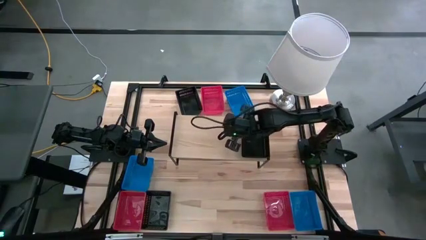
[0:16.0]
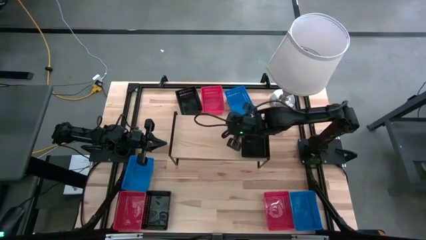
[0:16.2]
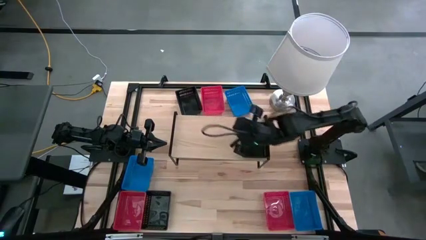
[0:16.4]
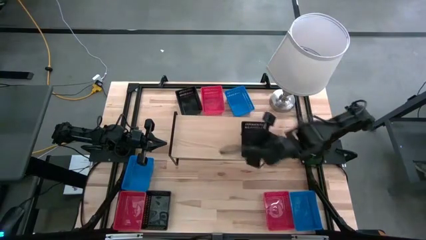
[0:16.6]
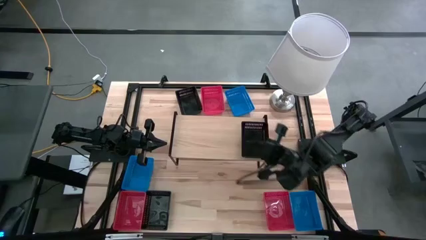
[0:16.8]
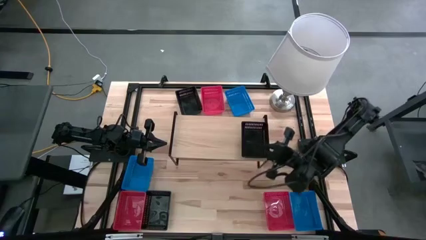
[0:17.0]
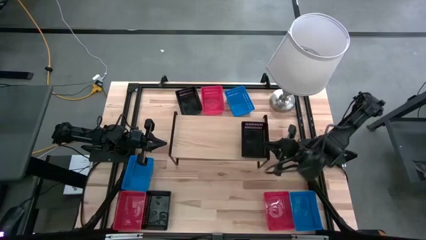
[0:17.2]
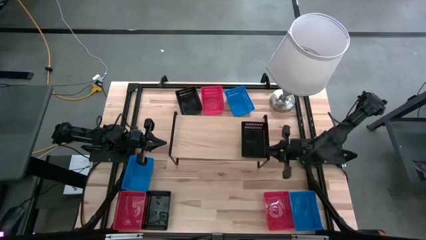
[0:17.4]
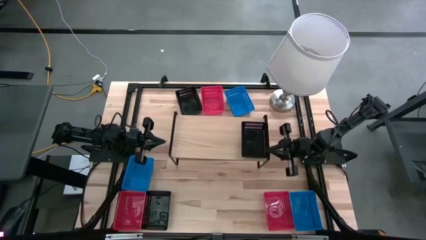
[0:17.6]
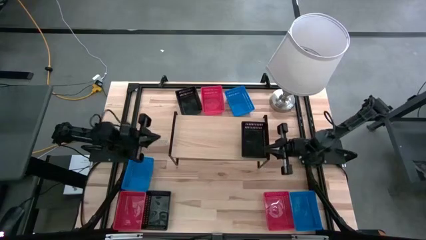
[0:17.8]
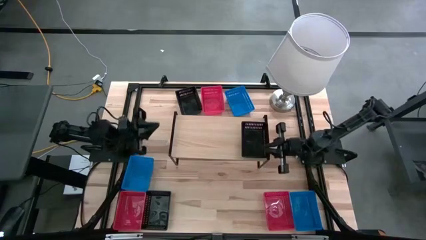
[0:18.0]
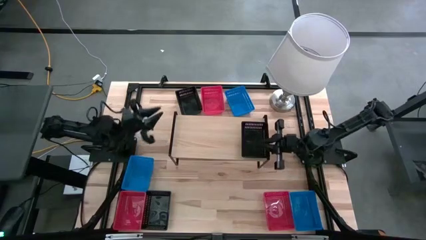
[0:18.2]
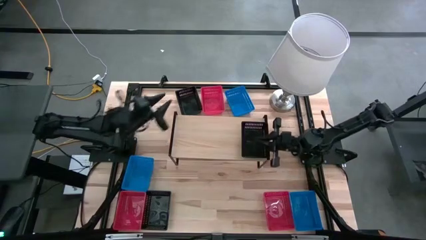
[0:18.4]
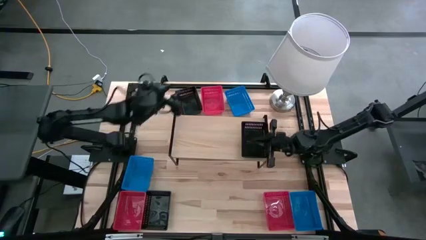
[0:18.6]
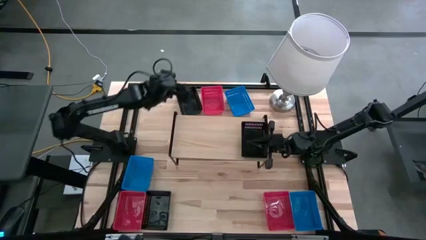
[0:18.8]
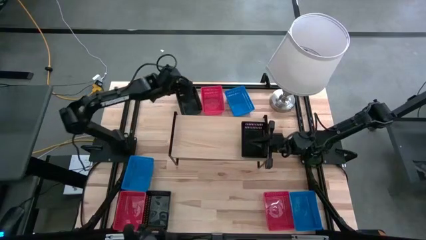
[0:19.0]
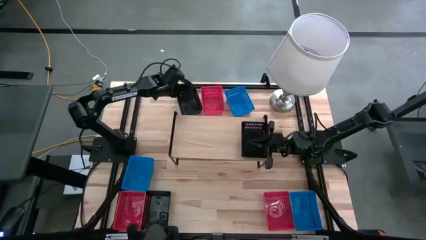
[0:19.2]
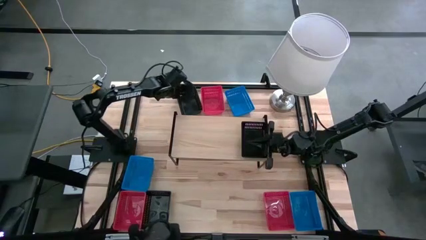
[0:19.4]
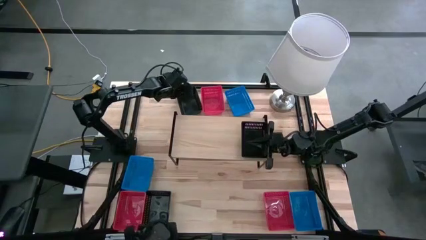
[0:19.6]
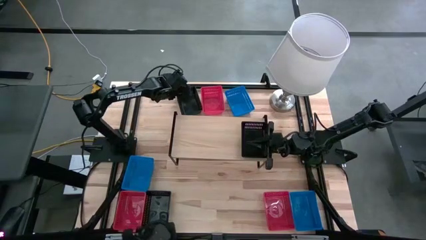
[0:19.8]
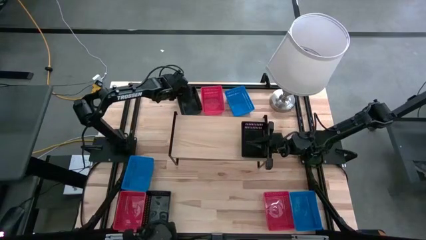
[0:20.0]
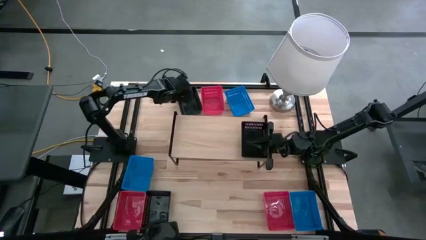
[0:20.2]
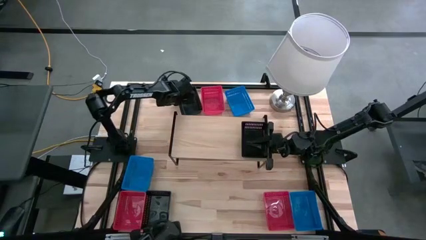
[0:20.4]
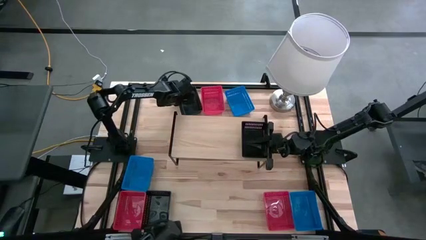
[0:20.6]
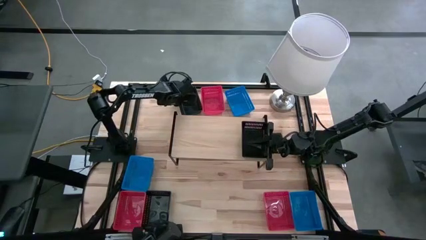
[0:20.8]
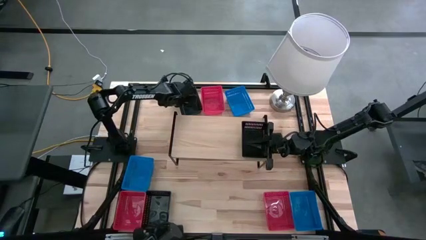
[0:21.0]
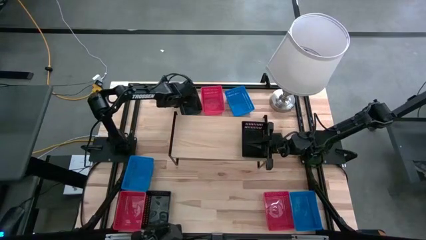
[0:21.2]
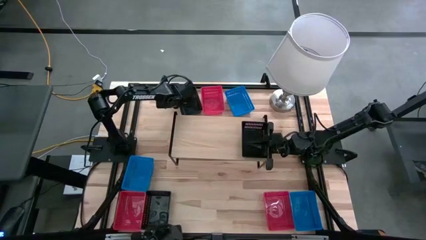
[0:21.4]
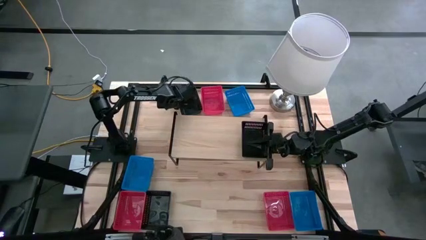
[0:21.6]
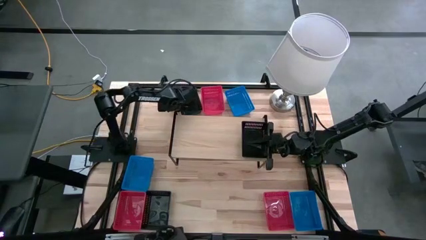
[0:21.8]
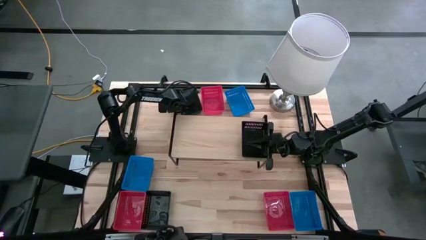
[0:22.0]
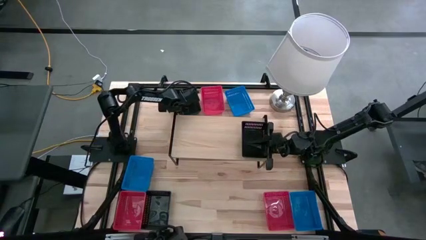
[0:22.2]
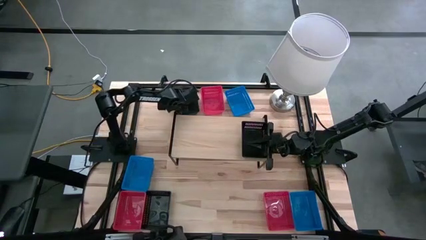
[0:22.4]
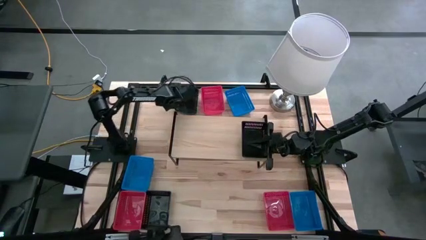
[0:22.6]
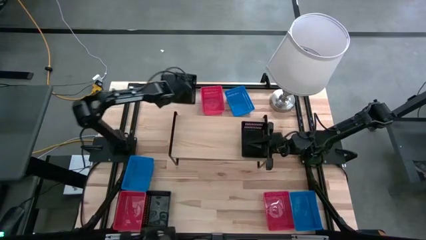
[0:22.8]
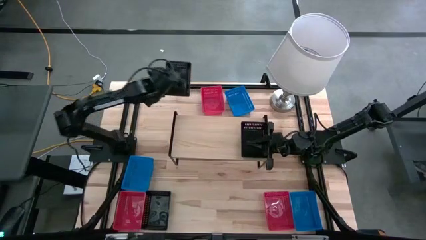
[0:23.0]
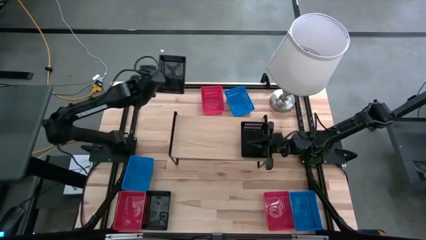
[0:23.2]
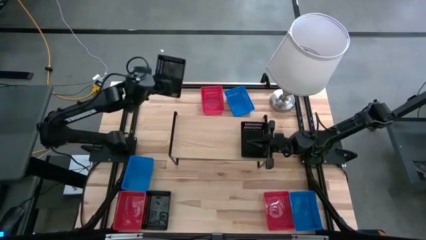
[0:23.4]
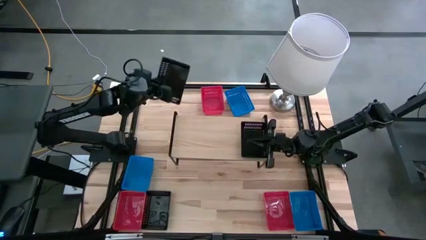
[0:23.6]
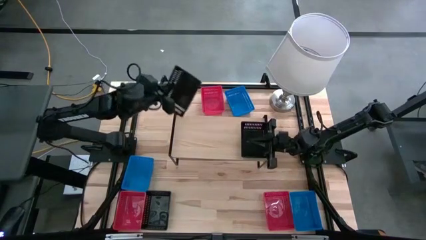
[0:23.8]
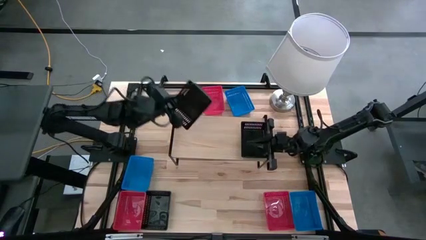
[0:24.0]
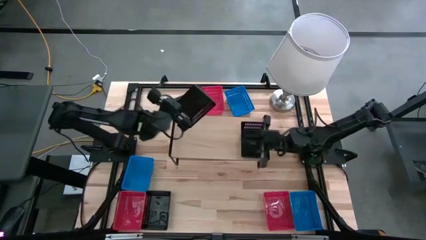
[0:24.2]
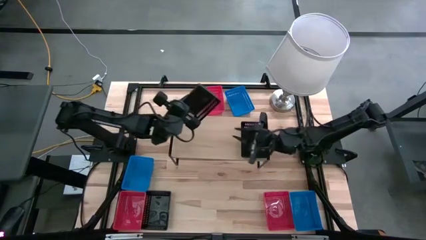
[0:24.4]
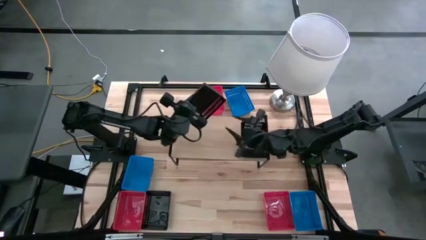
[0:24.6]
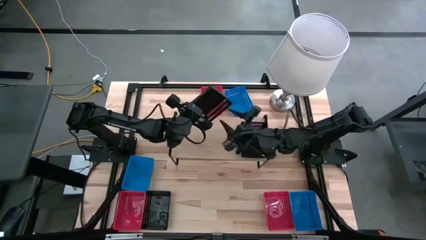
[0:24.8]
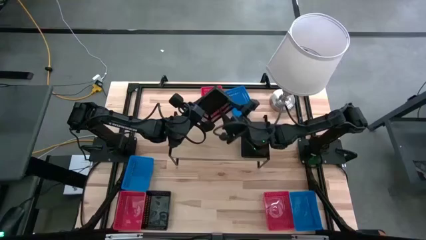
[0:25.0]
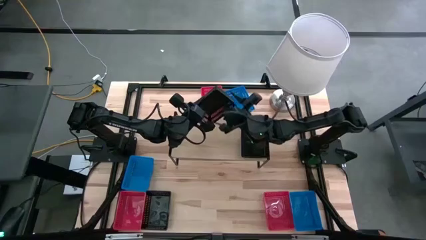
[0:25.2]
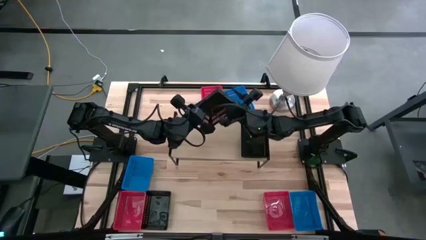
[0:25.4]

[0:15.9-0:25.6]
Task: Stack baskets on shelf by color
Stack the top black bin on the black bin on the shelf

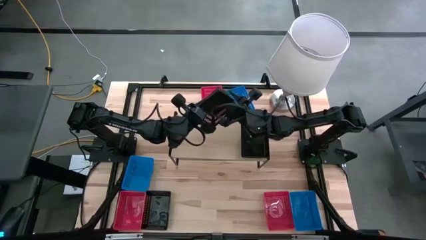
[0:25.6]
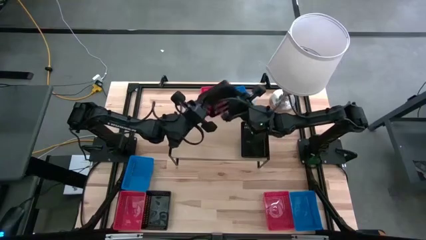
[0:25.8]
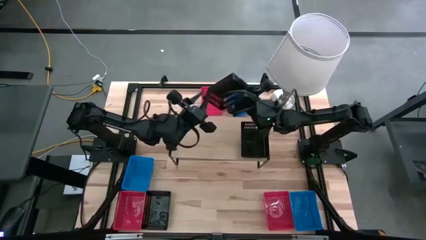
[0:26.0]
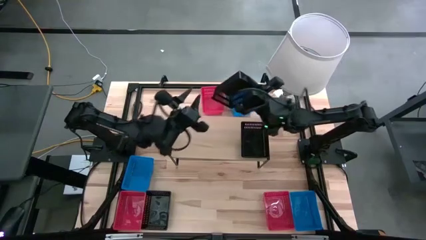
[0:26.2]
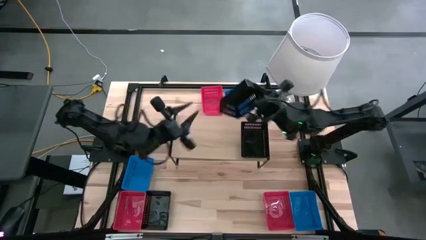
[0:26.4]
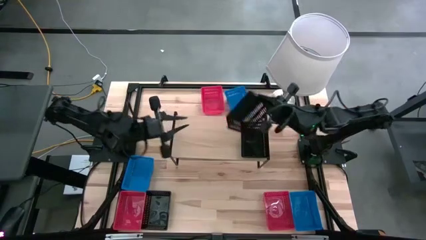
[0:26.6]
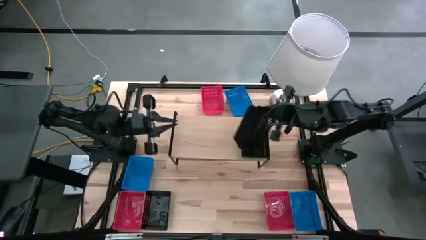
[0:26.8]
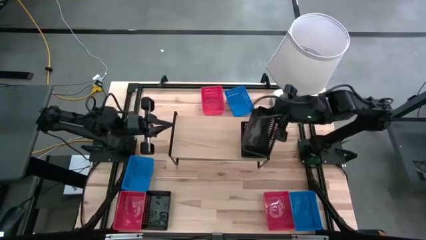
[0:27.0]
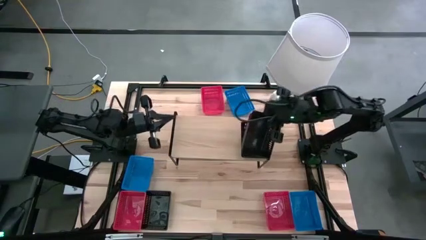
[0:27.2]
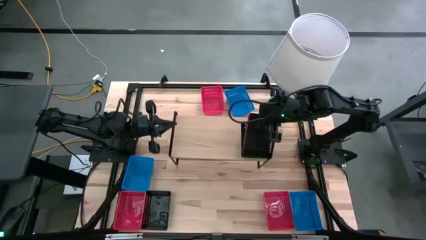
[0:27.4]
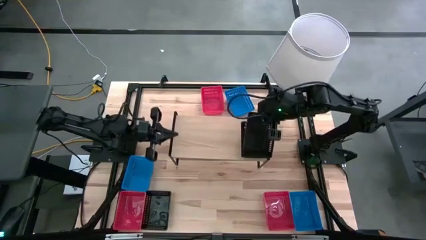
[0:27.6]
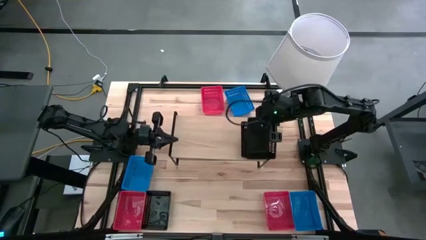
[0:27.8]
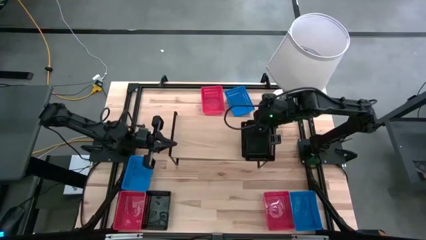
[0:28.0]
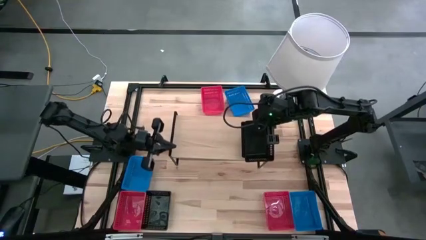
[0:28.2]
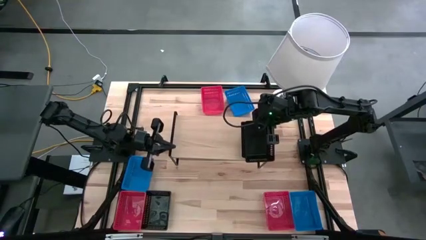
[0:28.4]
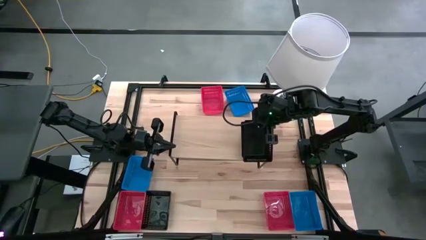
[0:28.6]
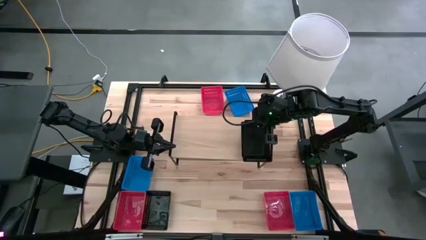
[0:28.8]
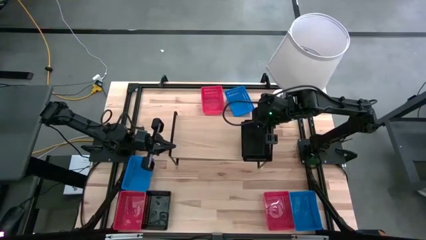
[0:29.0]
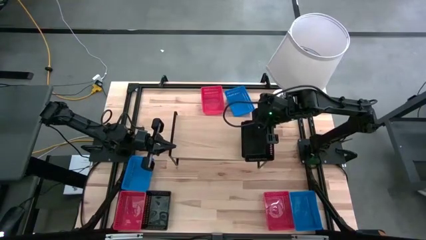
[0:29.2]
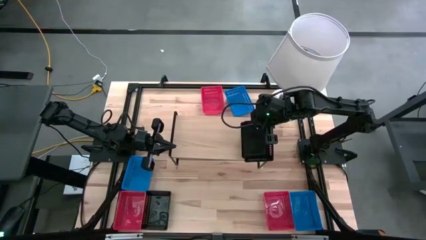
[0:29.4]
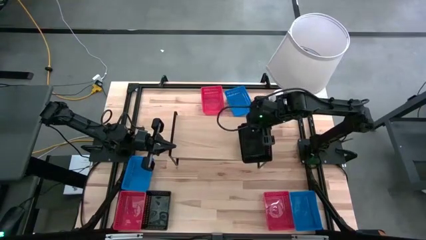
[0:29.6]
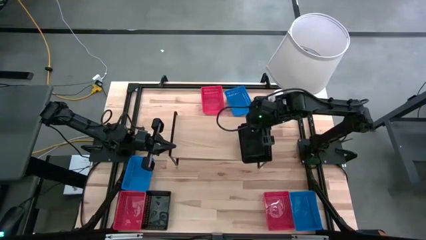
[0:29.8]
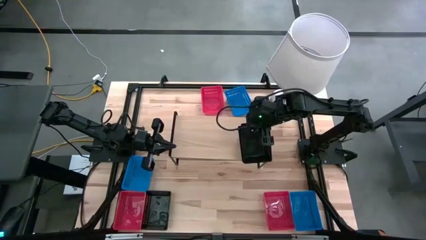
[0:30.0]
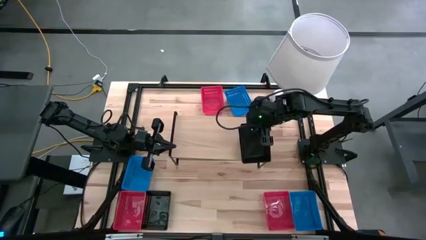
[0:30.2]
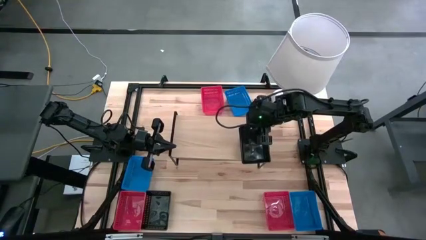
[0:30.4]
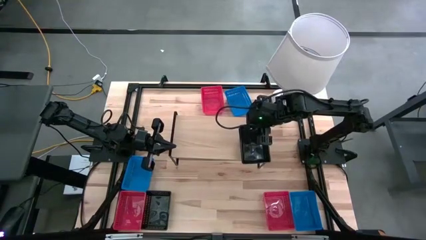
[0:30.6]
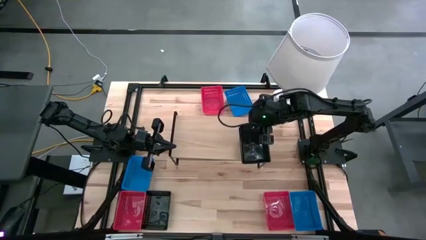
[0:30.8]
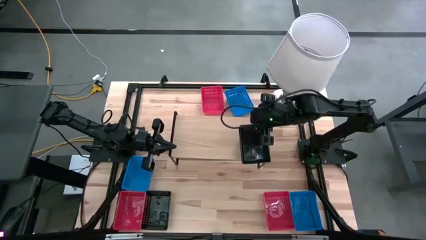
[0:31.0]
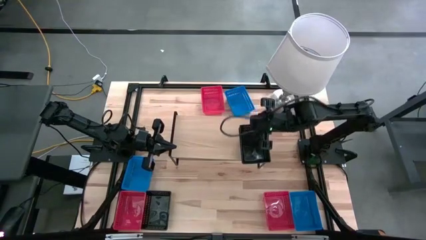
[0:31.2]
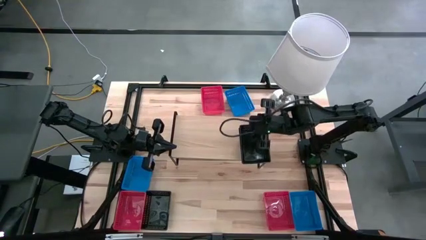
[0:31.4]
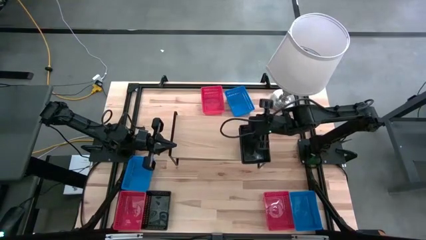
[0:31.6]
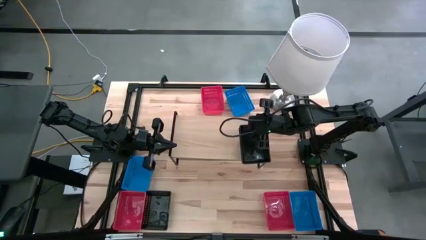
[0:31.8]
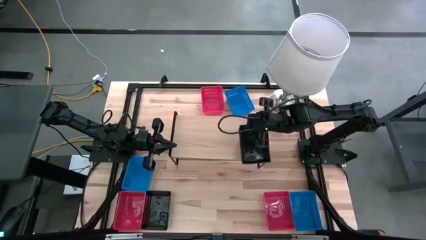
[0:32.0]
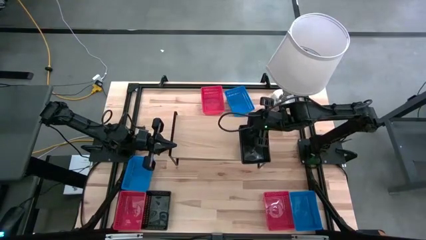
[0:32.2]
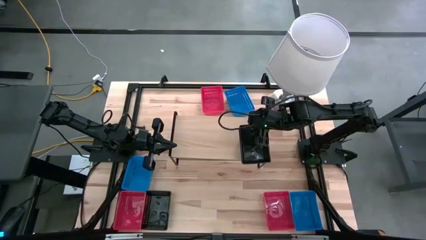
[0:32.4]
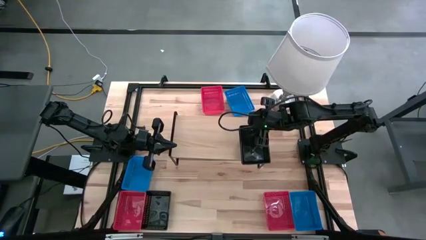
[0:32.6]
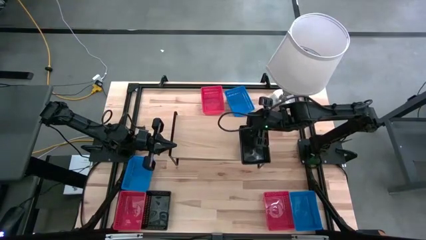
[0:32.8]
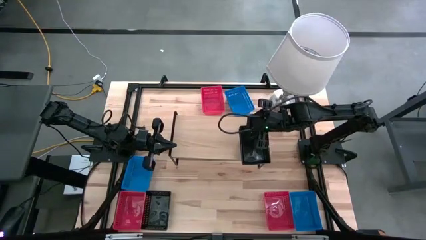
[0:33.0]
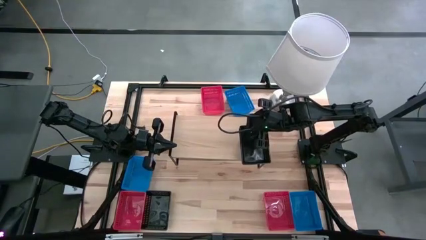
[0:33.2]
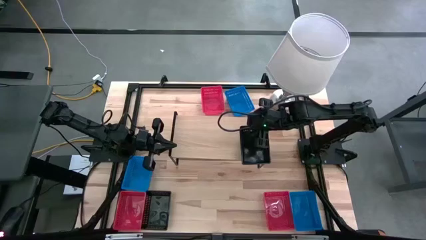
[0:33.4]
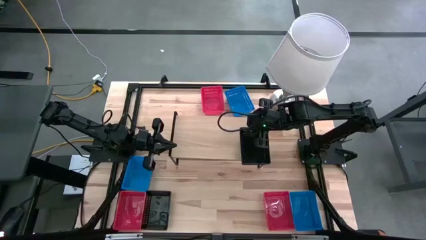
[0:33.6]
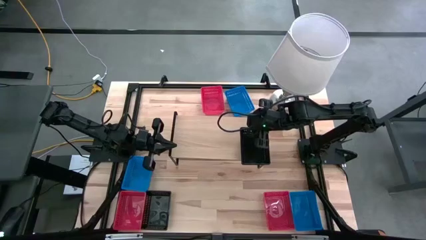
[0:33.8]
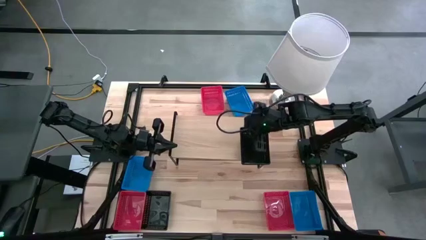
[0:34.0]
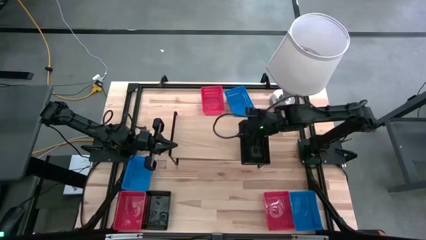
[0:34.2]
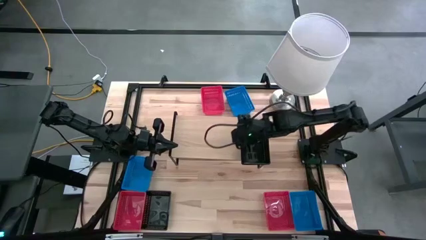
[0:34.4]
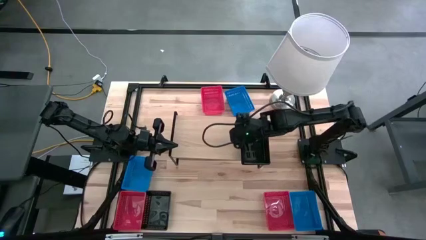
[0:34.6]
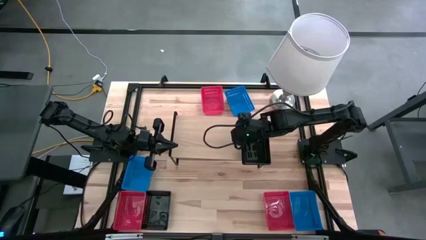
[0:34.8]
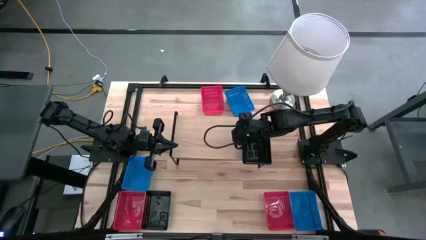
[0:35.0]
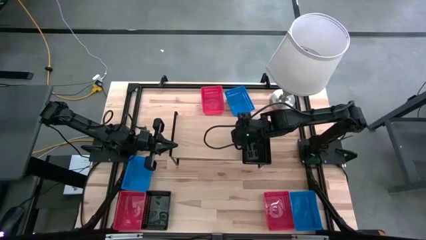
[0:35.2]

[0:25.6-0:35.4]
Stack the top black bin on the black bin on the shelf
